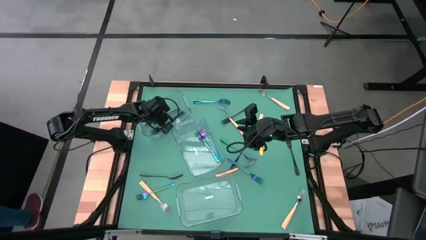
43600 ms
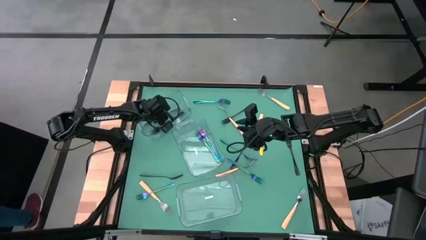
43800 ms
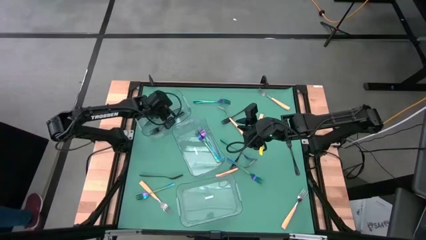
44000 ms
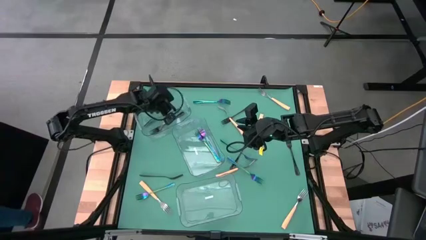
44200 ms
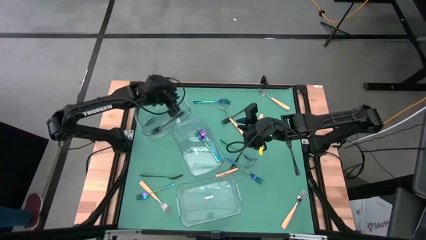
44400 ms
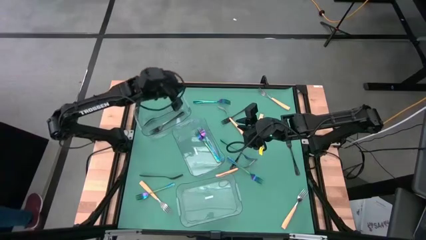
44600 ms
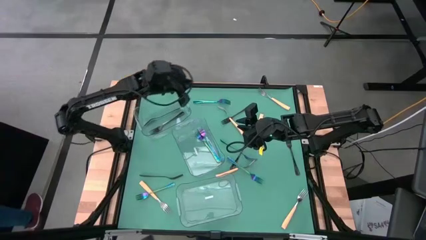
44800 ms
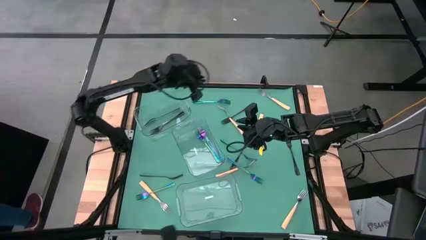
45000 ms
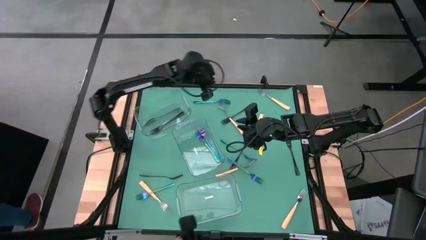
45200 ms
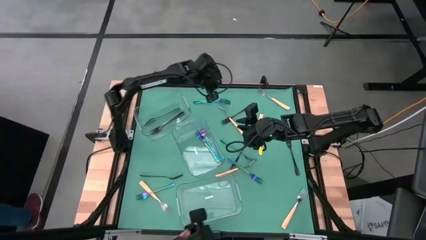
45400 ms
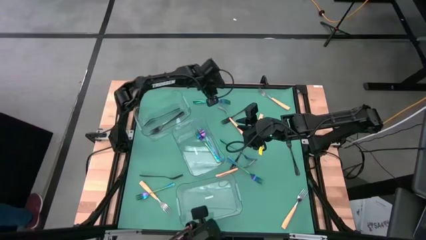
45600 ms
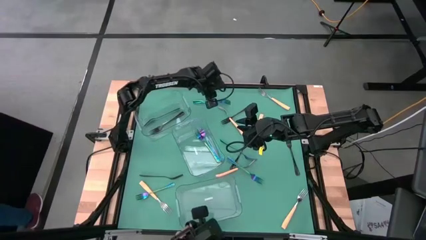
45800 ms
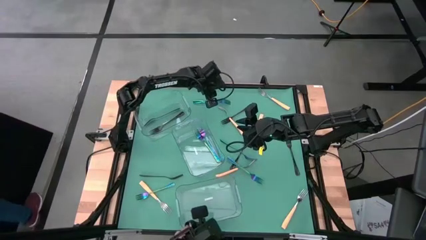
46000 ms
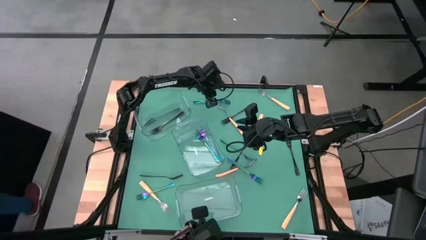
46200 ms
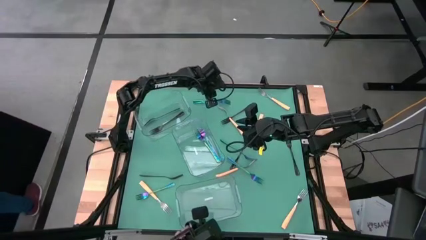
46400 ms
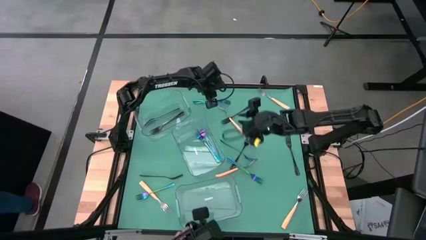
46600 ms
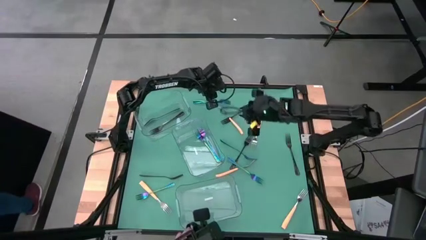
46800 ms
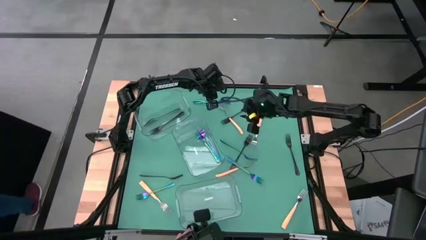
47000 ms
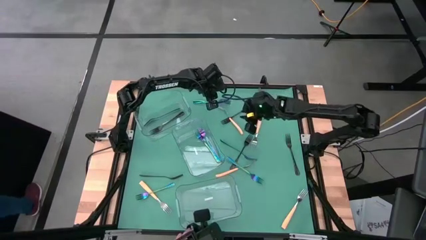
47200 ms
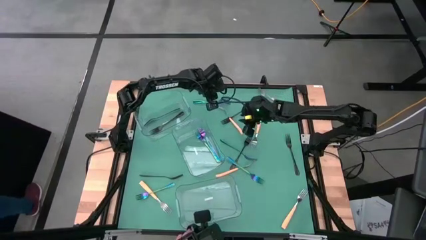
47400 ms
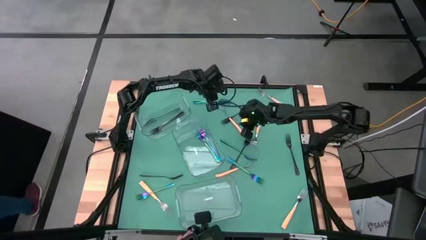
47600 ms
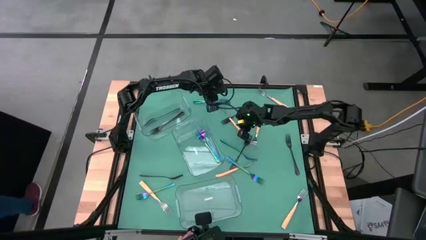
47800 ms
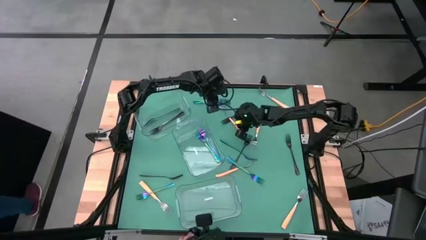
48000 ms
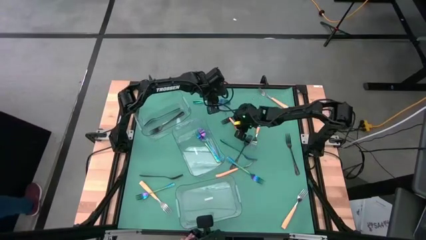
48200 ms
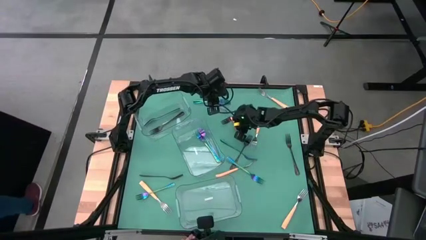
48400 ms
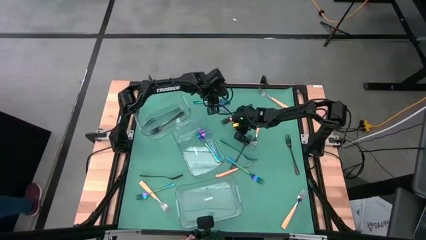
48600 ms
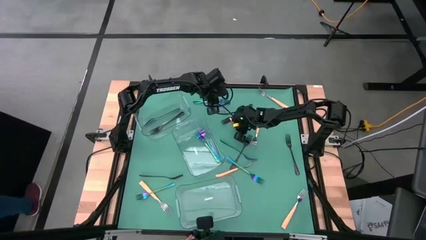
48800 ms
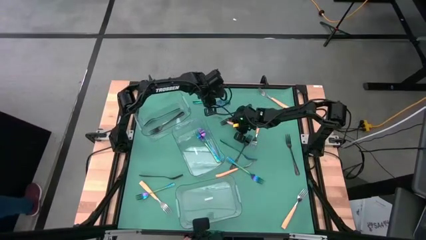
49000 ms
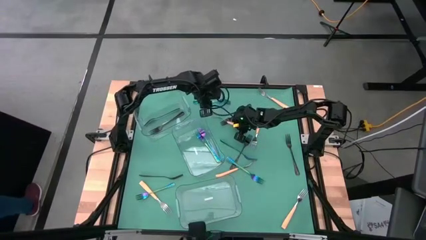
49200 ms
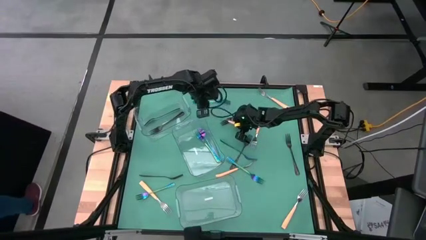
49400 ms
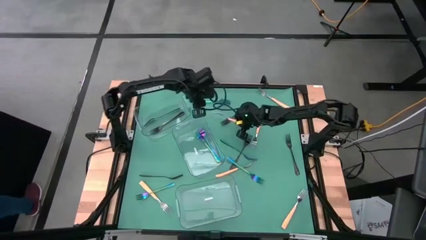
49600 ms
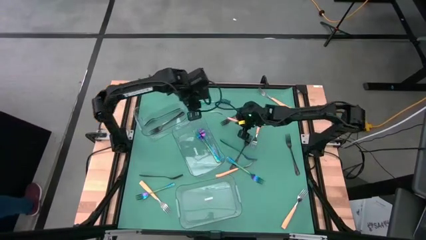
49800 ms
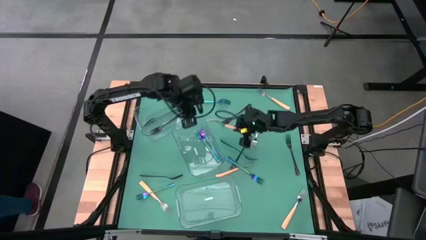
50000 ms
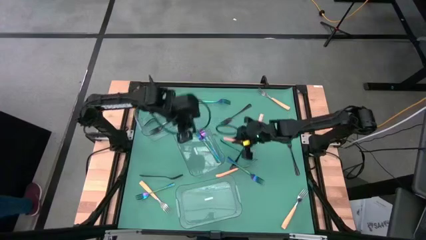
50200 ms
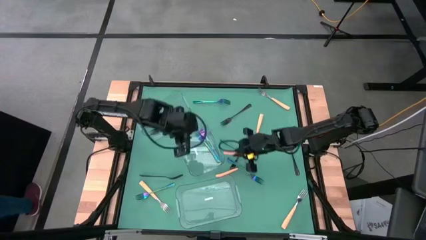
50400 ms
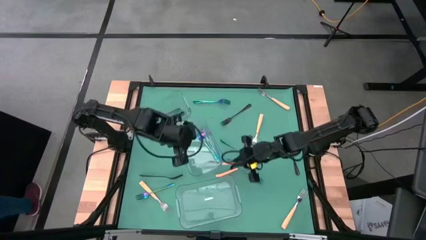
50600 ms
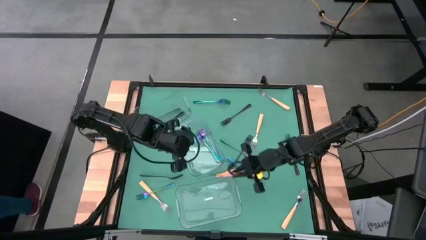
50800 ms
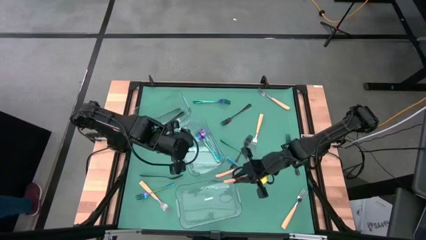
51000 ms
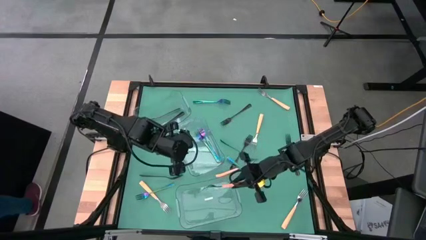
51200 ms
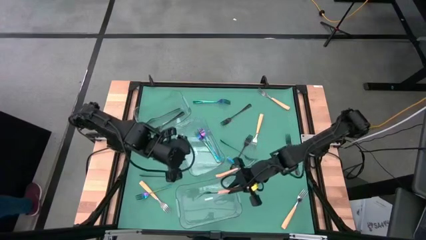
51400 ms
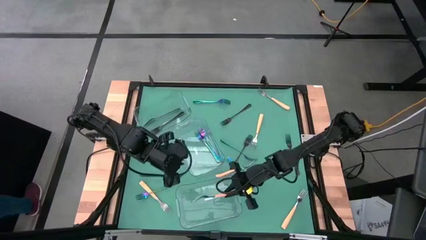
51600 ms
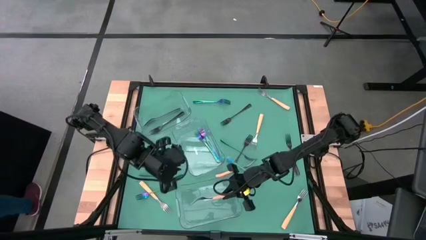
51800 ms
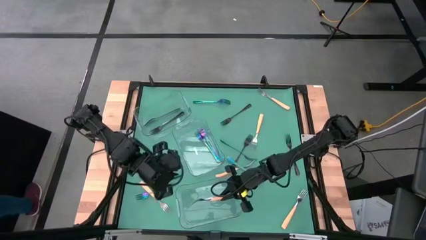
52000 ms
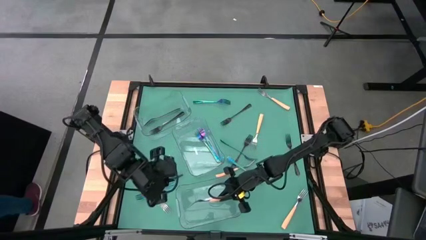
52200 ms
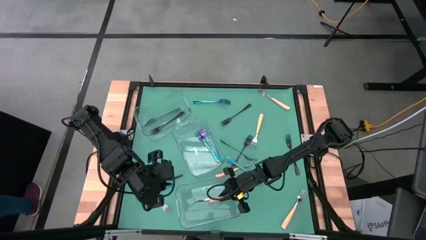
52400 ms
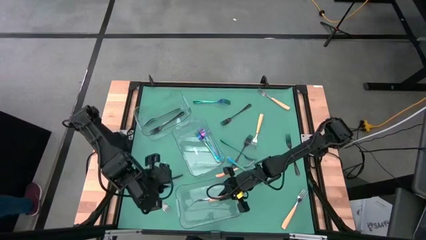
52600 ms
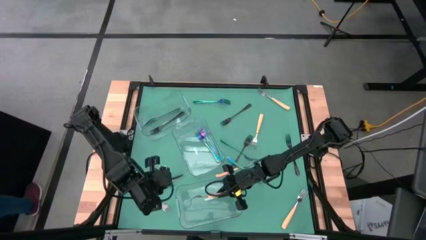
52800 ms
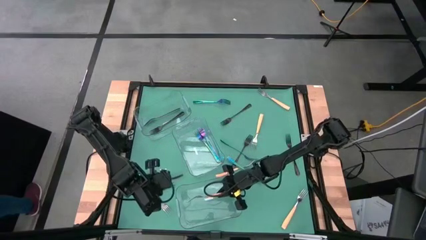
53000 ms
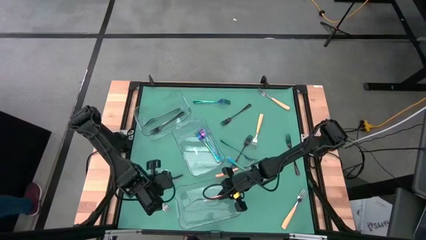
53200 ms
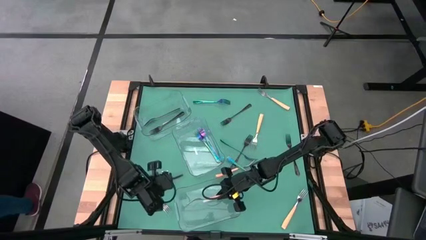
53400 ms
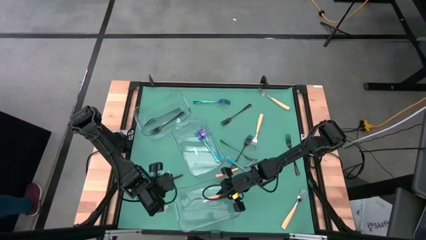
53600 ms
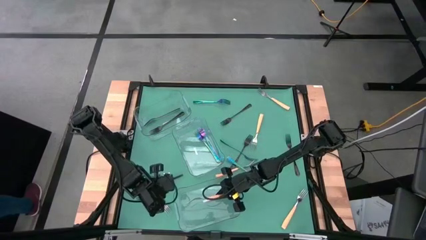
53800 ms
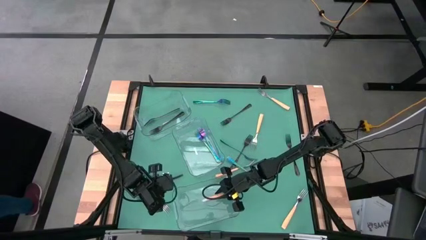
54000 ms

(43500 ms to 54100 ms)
Task: Sort silverware by color (type)
Put the yellow fork into the bottom transparent bin

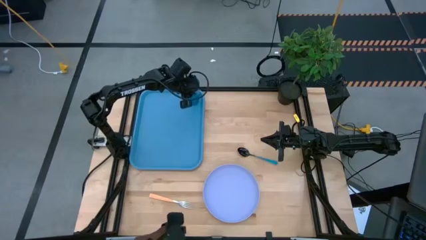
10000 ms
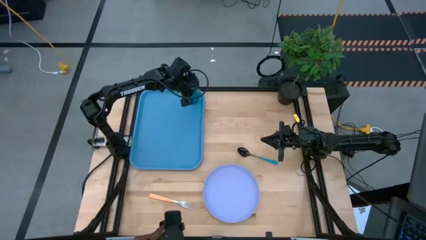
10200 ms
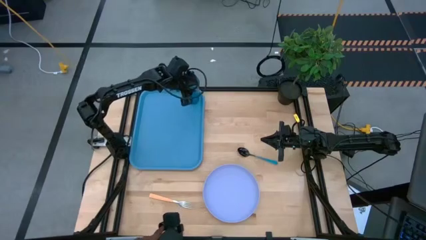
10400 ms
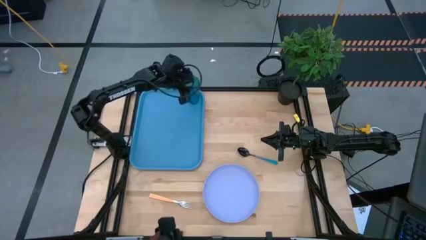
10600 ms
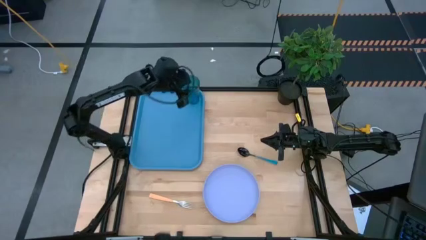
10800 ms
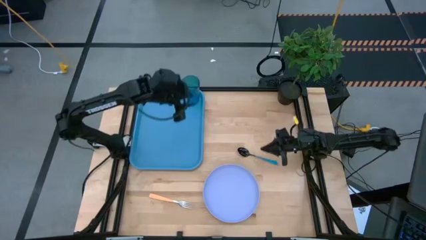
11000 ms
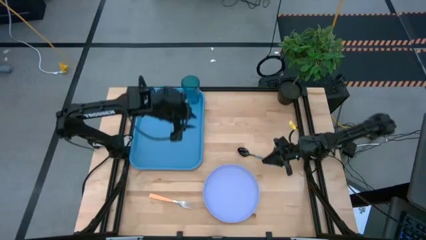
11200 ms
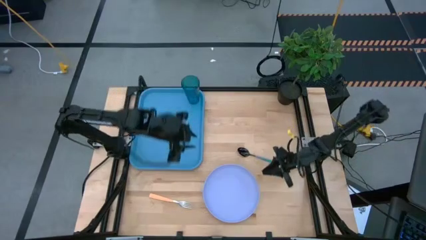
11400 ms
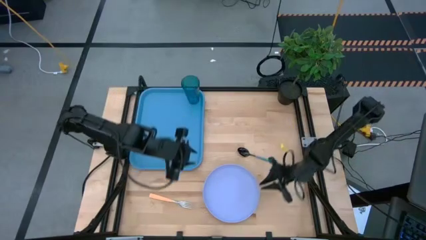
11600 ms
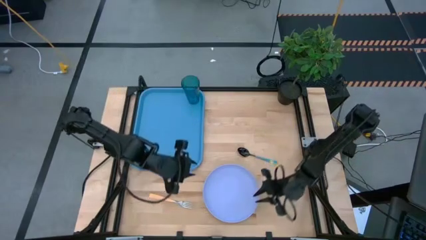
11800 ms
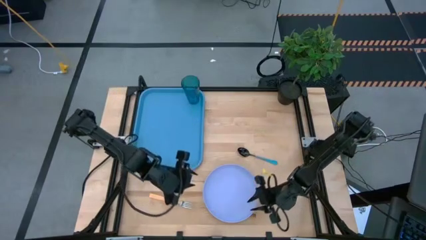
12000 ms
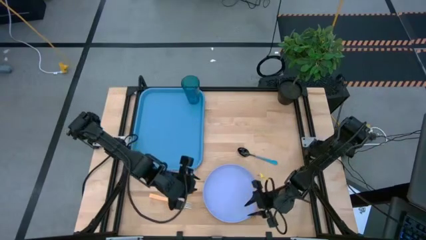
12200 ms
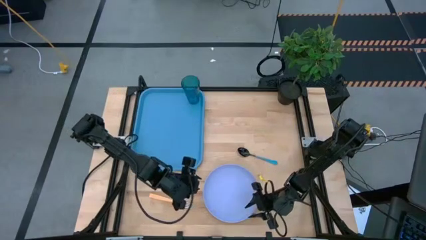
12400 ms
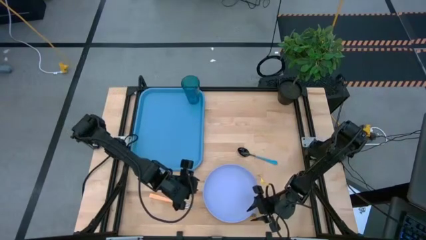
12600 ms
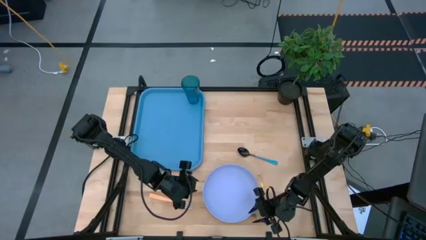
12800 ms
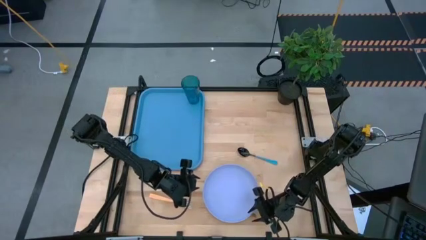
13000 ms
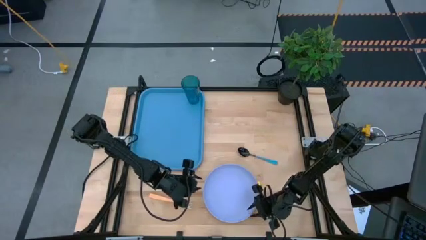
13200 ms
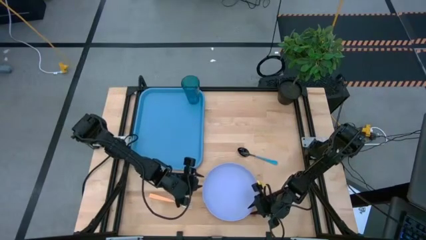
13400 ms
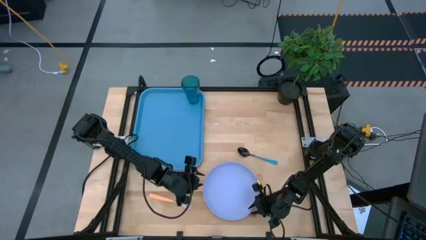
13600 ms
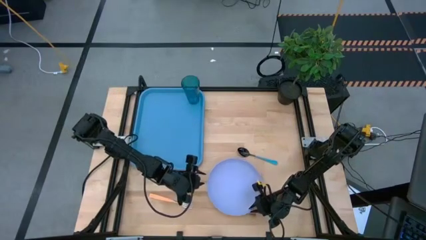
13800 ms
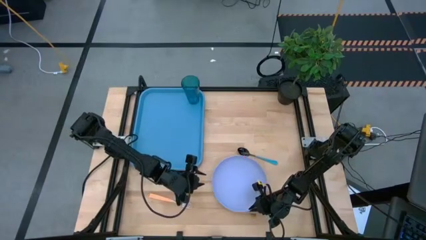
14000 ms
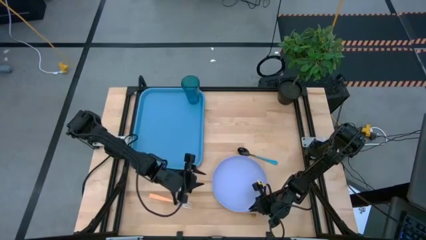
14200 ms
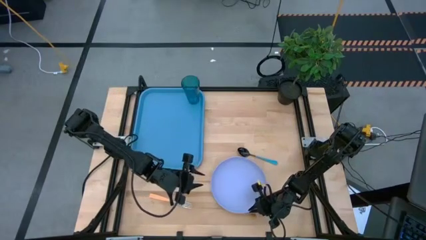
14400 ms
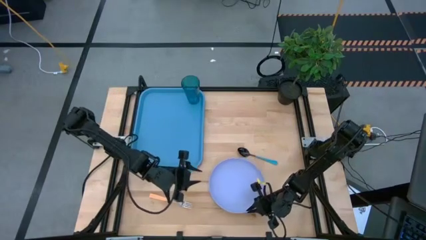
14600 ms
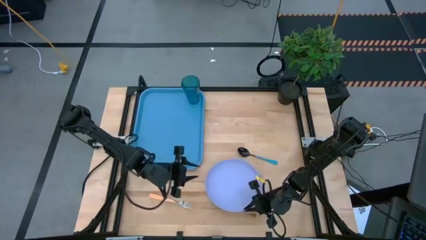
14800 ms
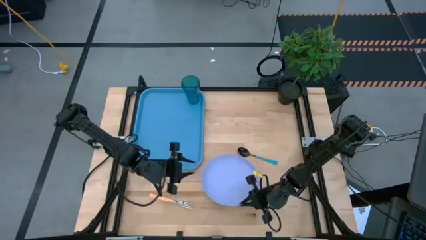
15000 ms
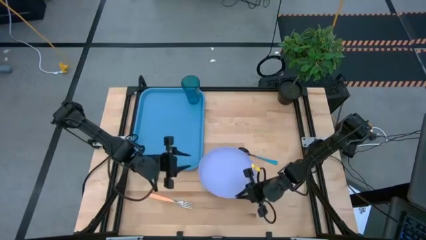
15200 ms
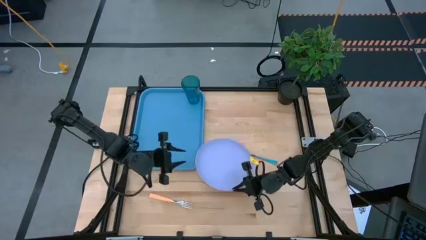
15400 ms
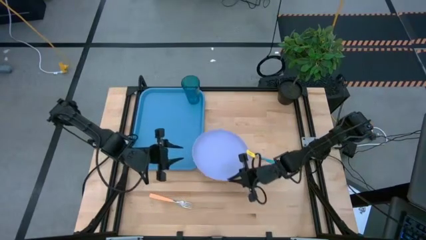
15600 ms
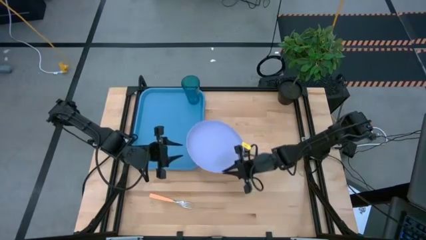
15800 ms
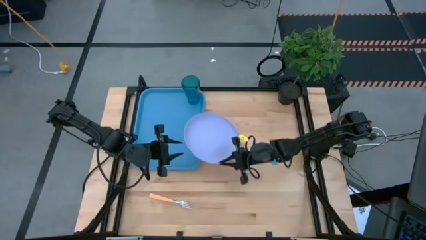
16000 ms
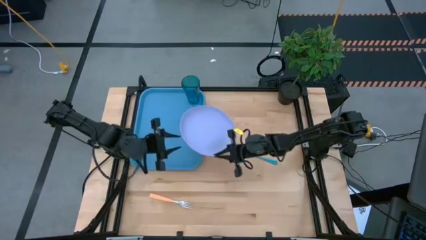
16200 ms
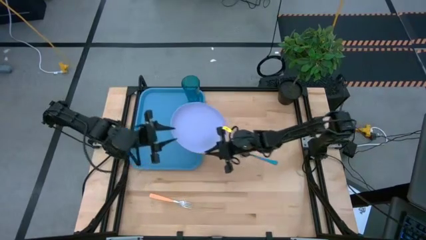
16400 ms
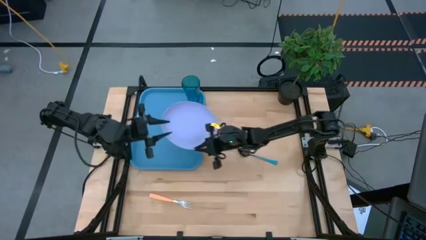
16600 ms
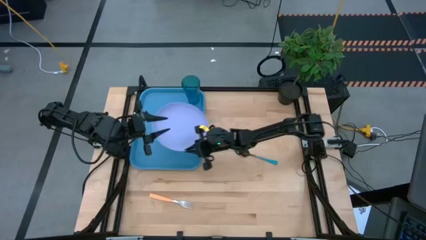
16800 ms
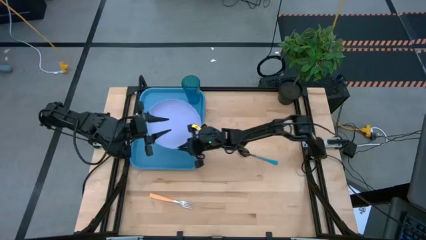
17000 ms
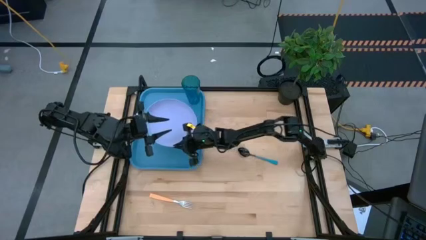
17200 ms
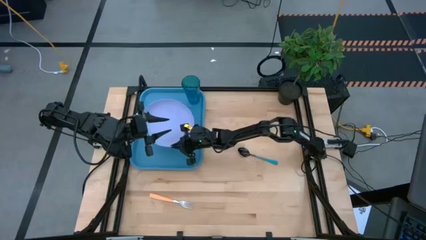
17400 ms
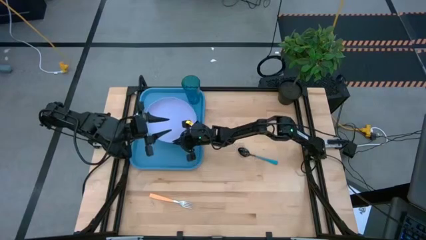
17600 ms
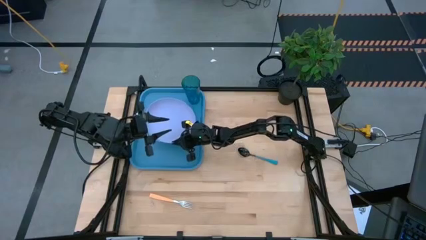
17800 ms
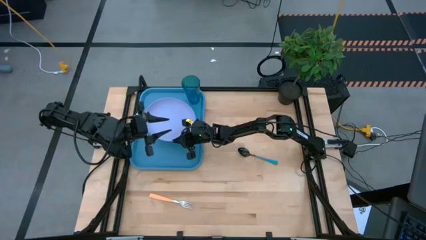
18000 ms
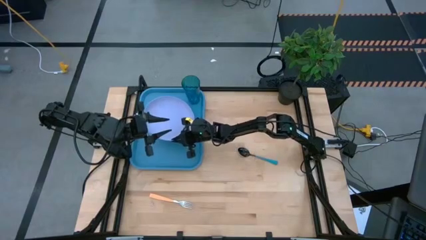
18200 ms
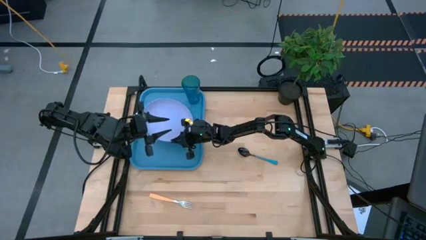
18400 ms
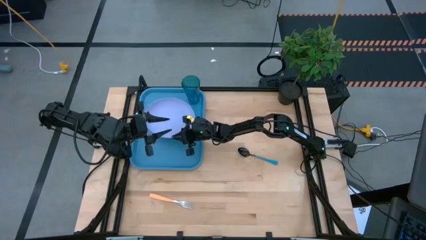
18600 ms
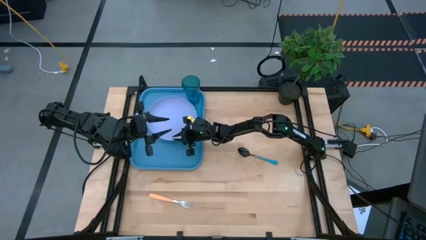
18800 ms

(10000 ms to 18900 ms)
Task: Pick and place plate/cup/fork/spoon on tray
Put the purple plate on the blue tray
